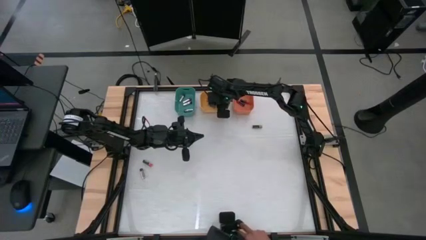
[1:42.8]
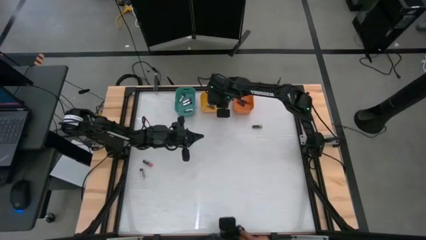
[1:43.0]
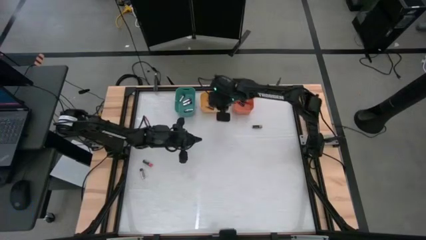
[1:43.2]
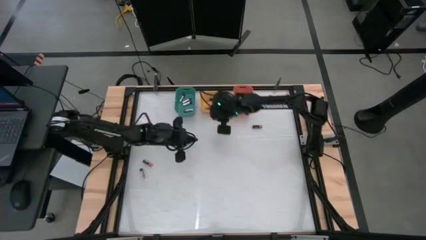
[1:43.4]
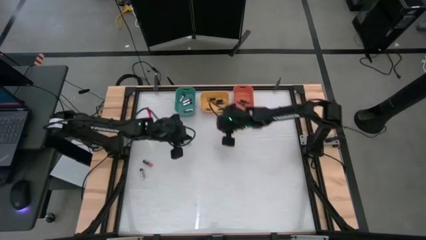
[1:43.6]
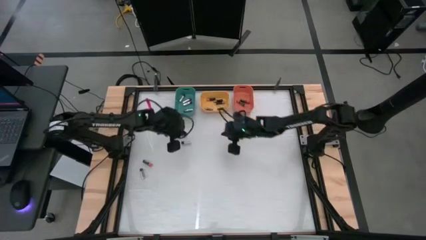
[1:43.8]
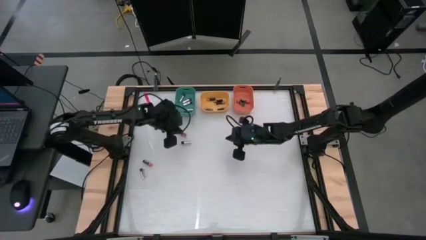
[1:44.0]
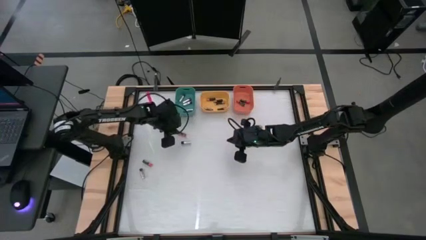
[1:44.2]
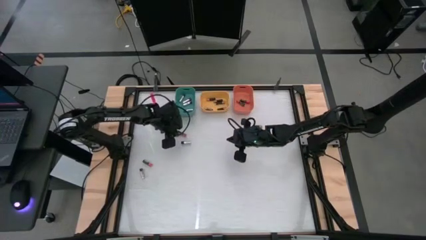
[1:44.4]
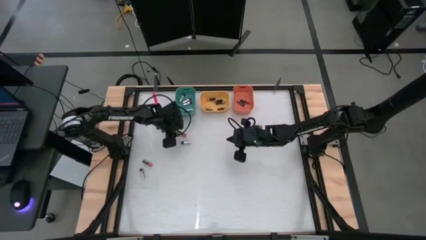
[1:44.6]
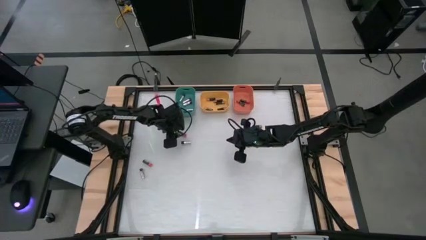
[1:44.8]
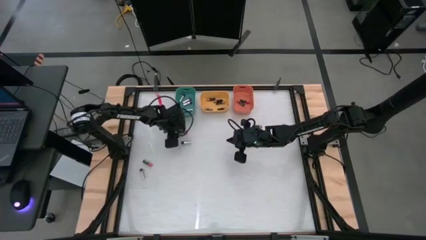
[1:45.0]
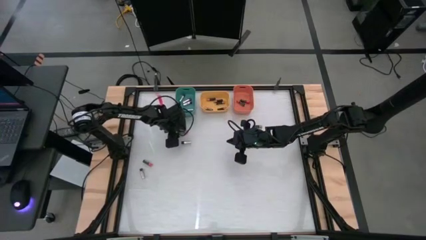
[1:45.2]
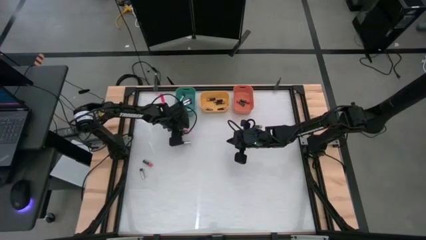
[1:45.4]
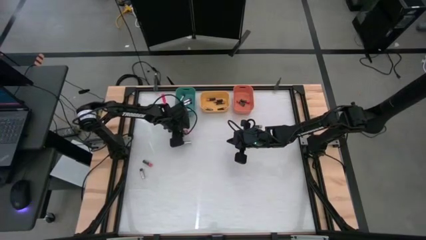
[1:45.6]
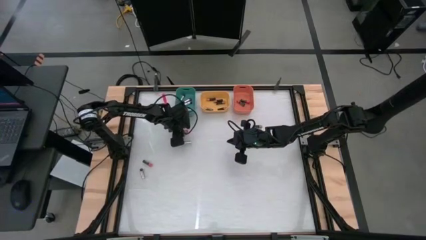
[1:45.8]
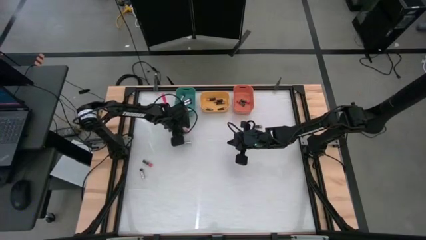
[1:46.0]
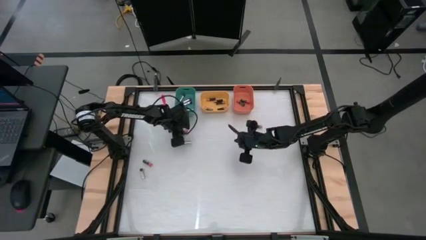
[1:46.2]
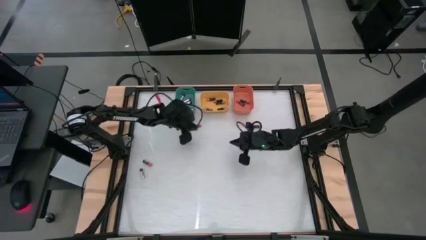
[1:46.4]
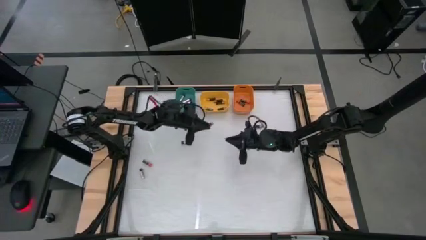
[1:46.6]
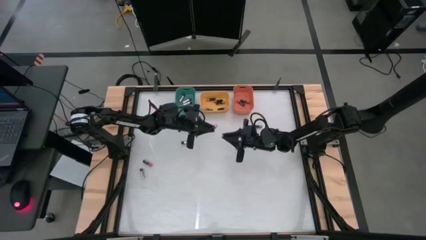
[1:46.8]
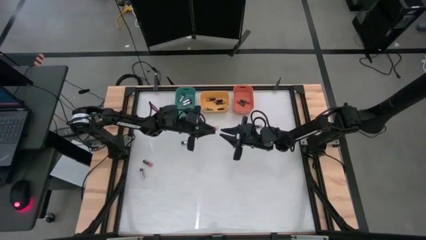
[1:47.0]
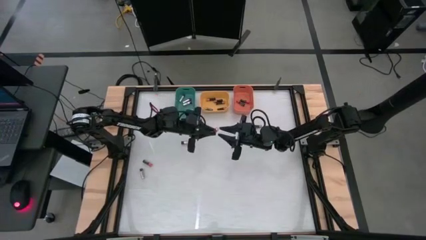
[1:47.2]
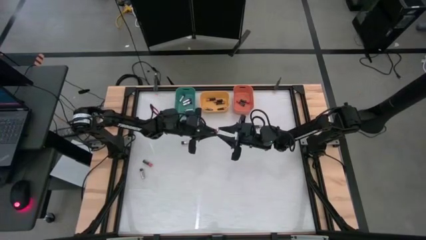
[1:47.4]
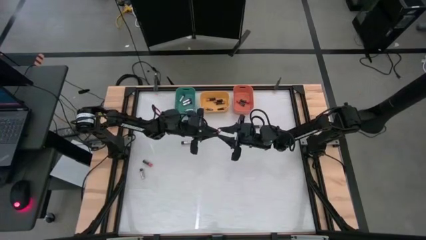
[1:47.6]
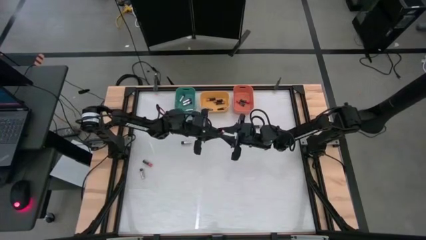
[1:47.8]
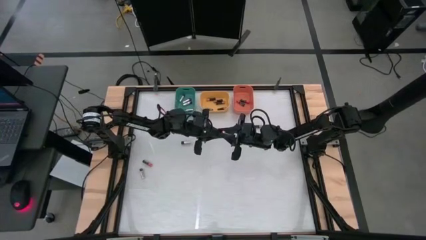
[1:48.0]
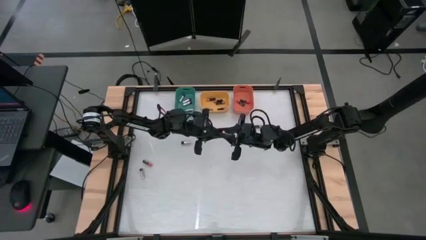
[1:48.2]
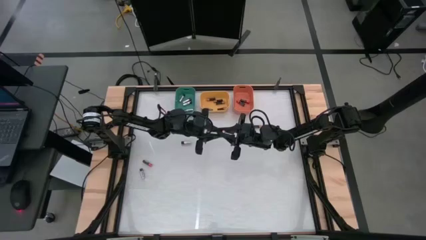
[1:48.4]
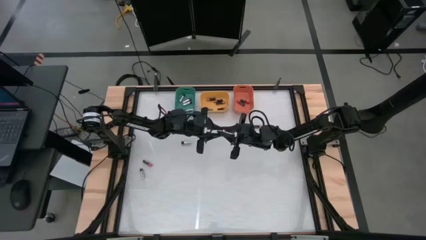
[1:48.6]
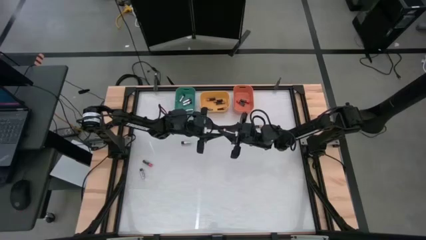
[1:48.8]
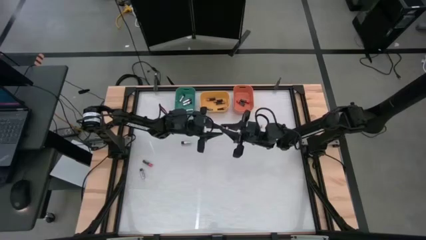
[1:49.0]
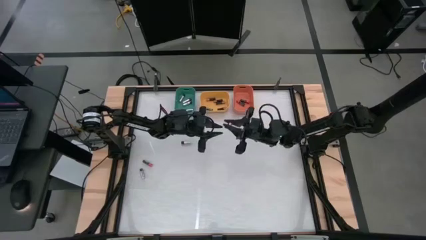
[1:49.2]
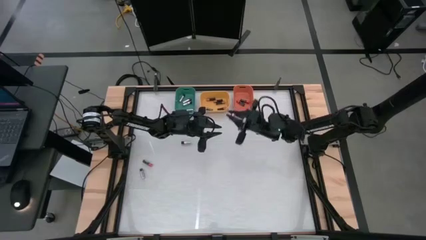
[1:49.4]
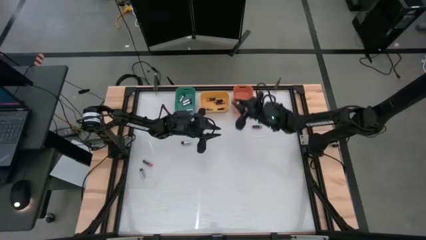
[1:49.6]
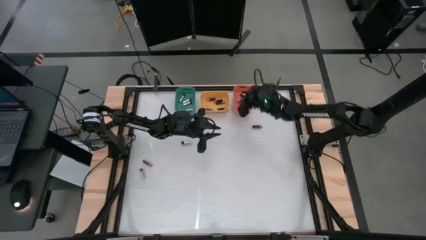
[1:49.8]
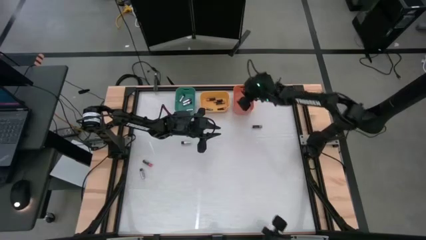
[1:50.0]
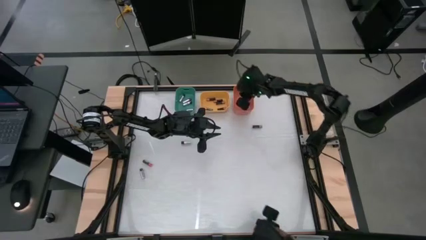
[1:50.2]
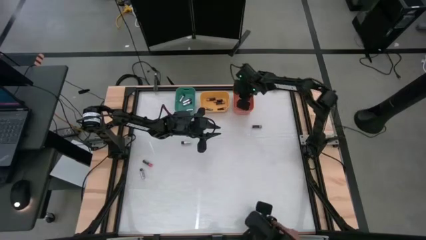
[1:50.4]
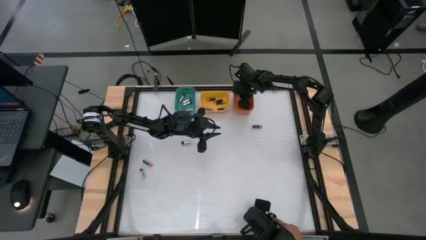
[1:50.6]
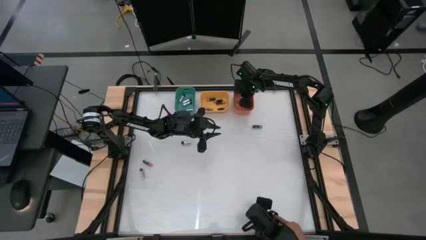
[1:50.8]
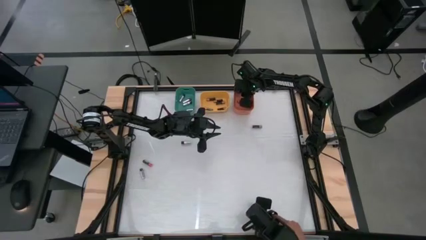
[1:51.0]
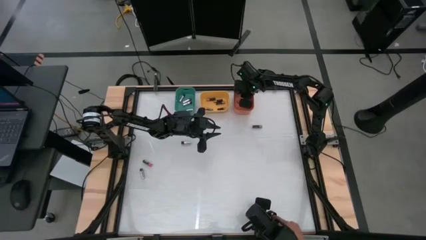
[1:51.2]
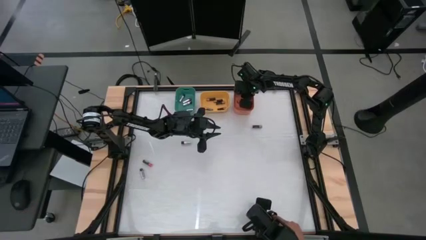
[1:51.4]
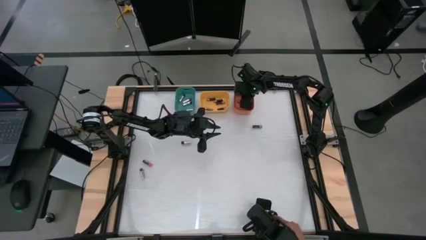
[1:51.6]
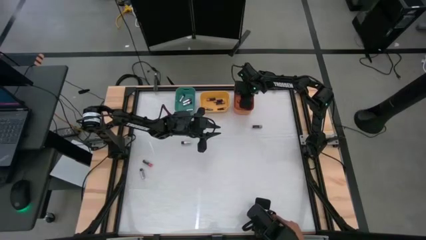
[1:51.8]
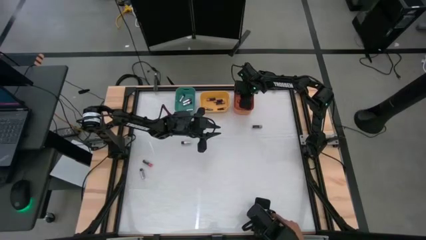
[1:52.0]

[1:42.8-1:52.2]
Task: Sort batteries
Put the red battery into the orange bin

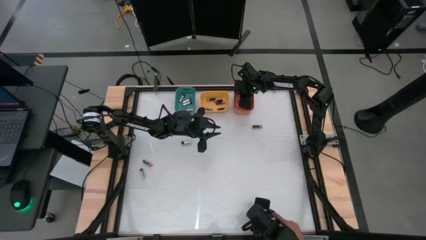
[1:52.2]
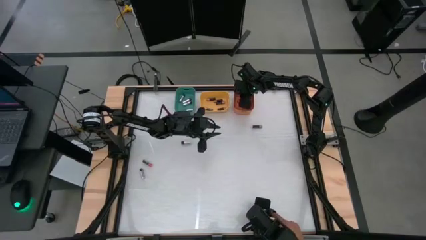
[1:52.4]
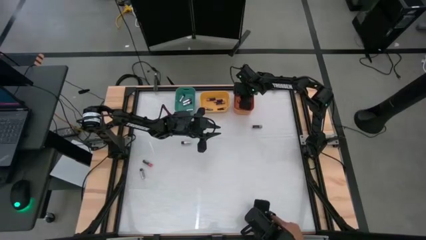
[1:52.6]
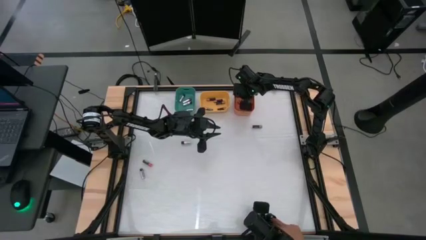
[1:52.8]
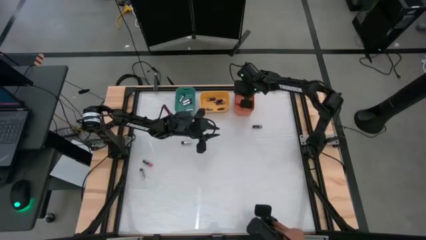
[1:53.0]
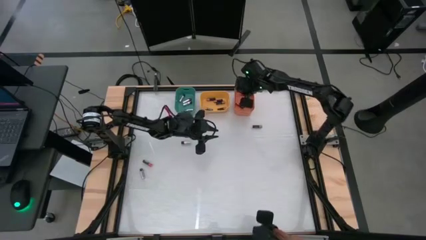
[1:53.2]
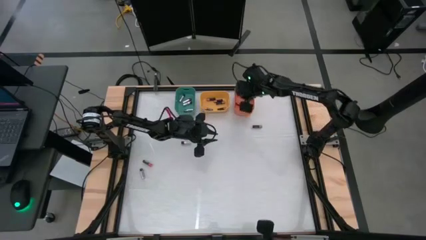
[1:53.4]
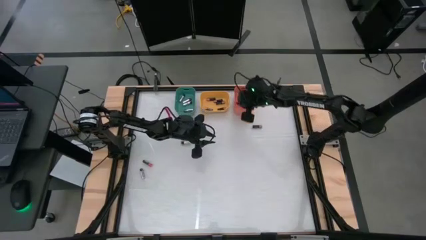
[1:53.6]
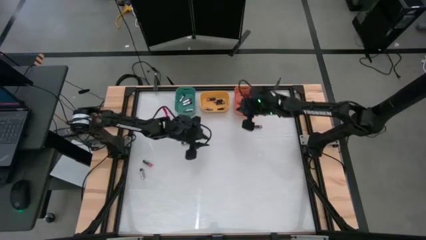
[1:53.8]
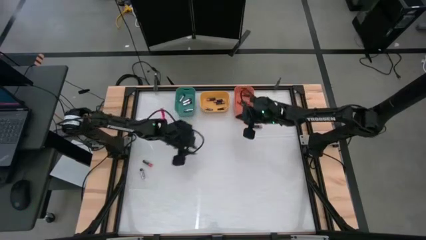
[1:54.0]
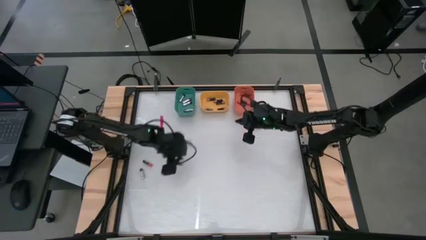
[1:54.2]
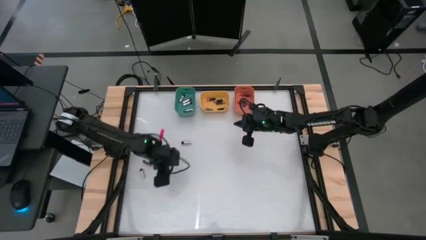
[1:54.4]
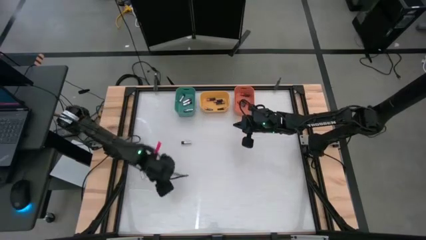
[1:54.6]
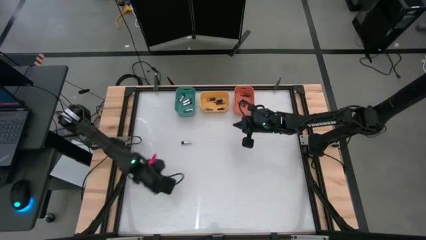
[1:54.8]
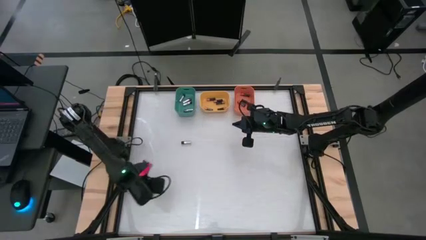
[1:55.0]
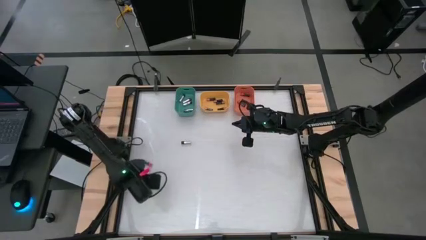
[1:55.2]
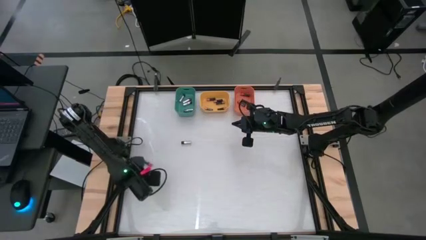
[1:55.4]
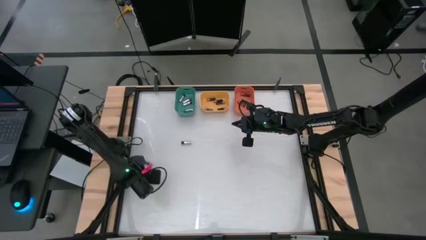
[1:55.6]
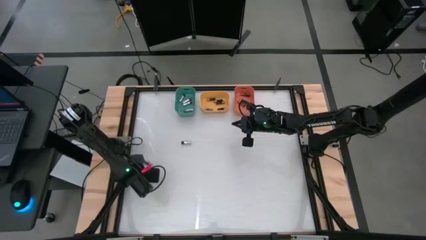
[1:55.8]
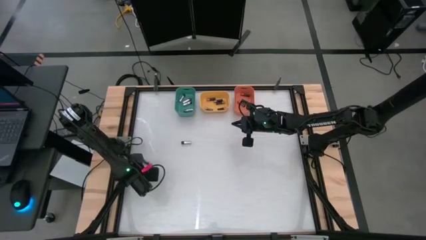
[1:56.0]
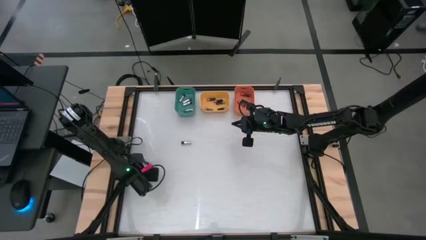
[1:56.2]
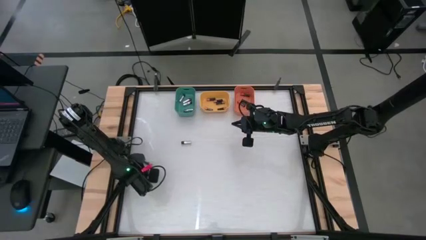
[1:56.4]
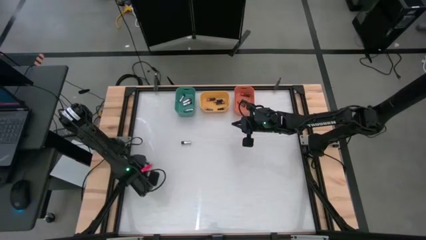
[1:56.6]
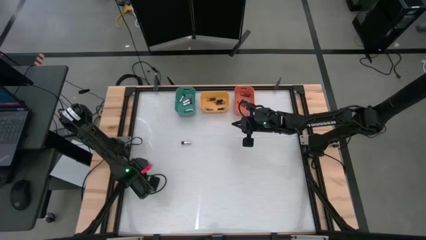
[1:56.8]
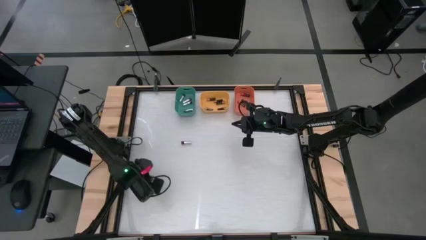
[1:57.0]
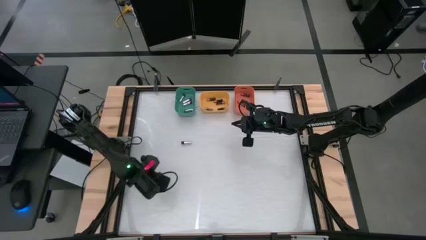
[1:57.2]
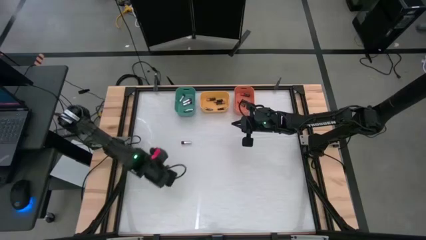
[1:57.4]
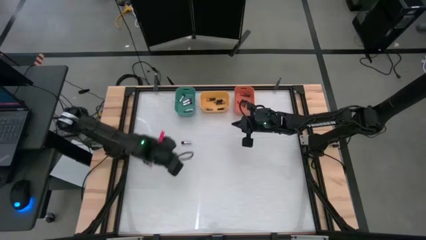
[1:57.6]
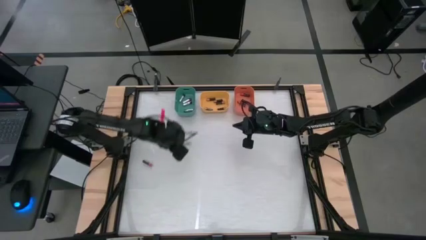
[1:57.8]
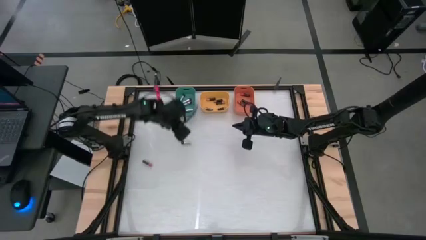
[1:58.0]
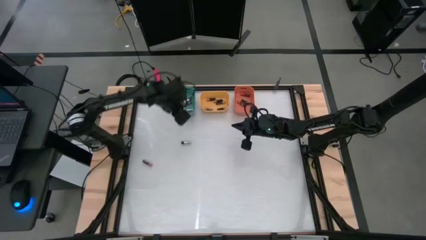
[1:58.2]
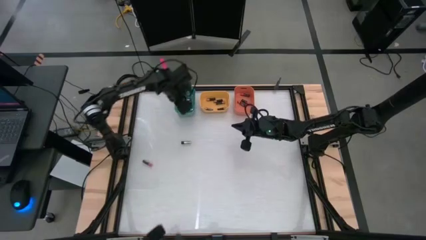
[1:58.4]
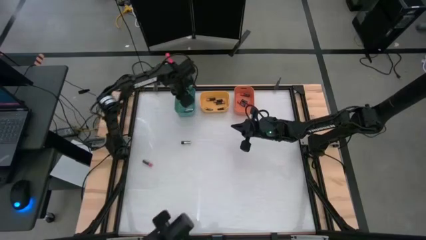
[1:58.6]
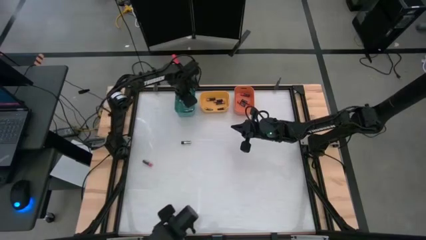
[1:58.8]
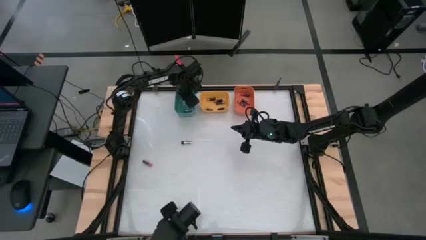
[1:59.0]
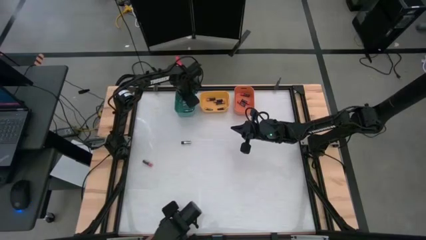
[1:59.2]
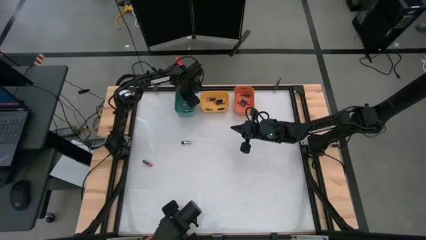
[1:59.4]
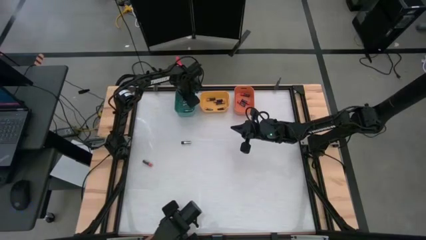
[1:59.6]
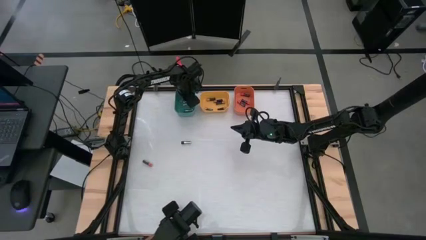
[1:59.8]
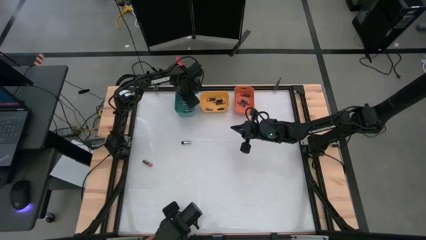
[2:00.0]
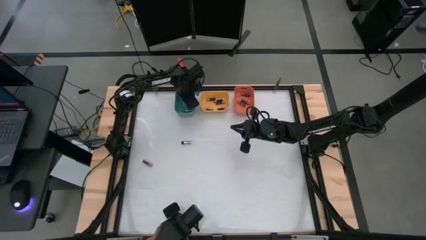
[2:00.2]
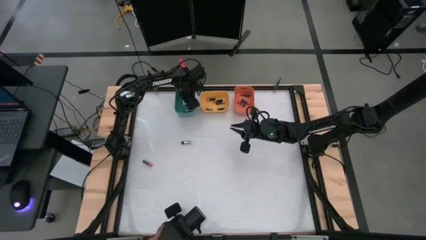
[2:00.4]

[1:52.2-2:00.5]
Put the silver battery into the green bin
